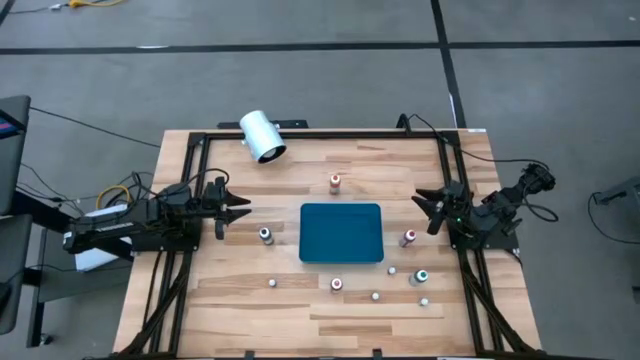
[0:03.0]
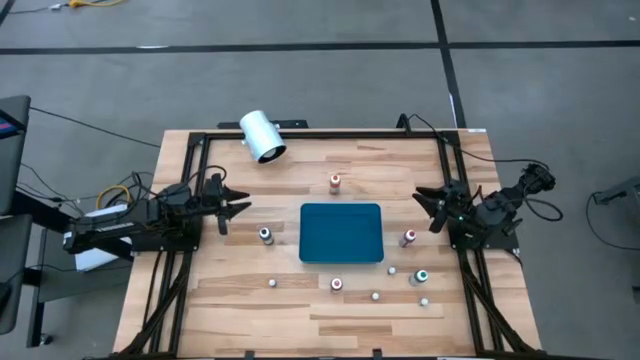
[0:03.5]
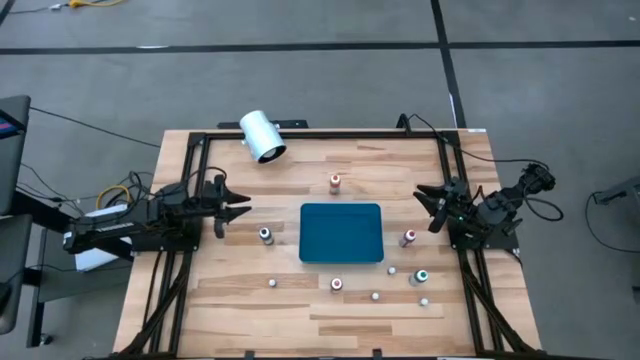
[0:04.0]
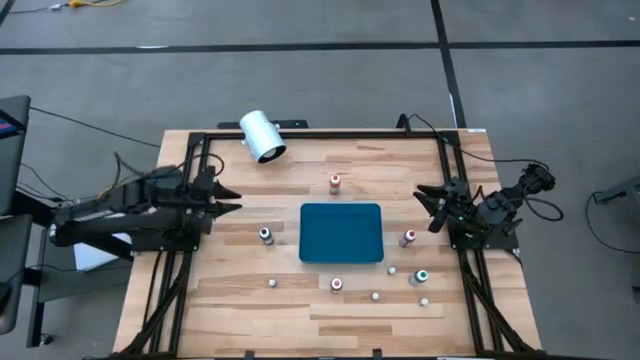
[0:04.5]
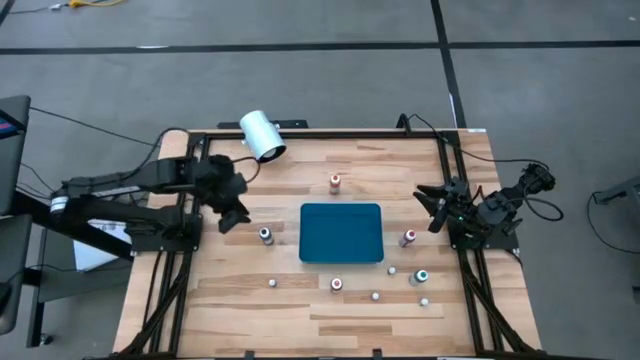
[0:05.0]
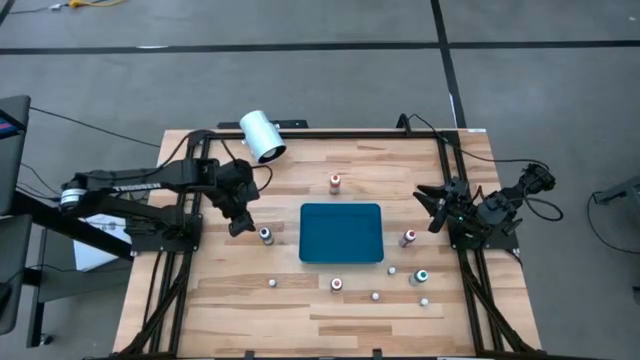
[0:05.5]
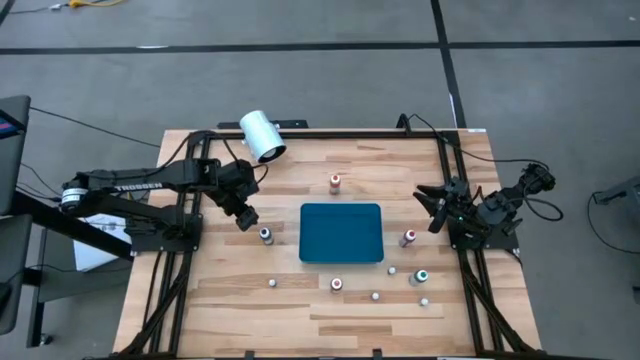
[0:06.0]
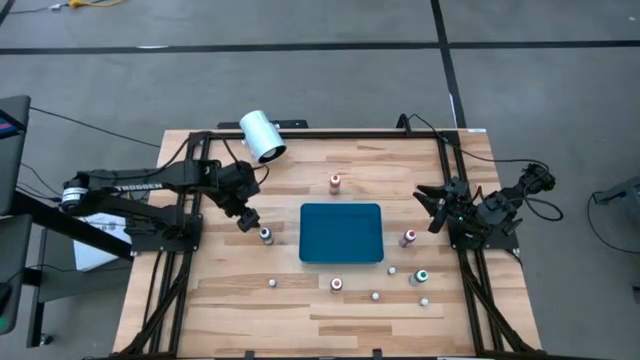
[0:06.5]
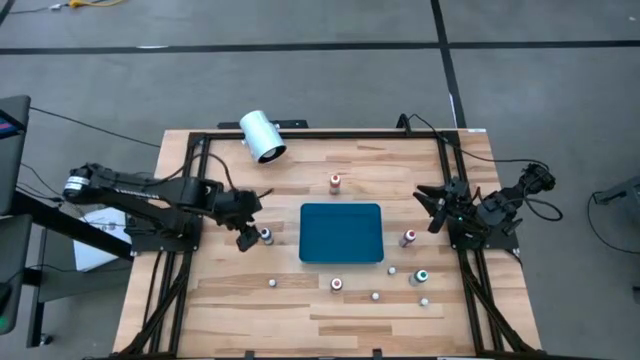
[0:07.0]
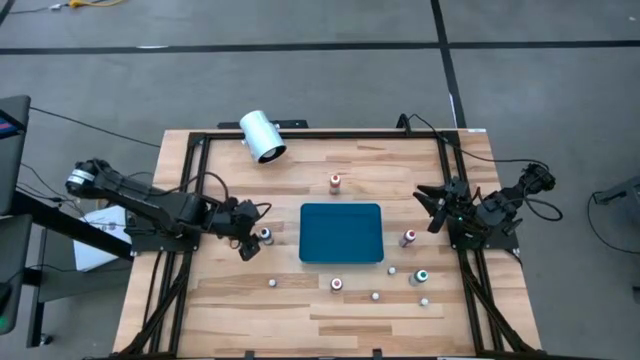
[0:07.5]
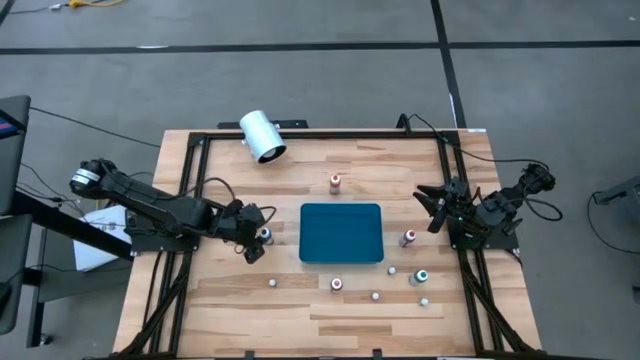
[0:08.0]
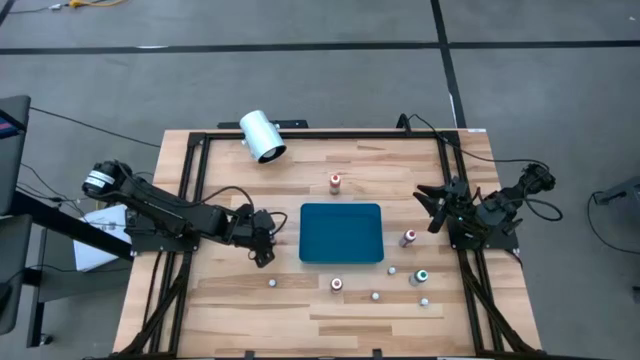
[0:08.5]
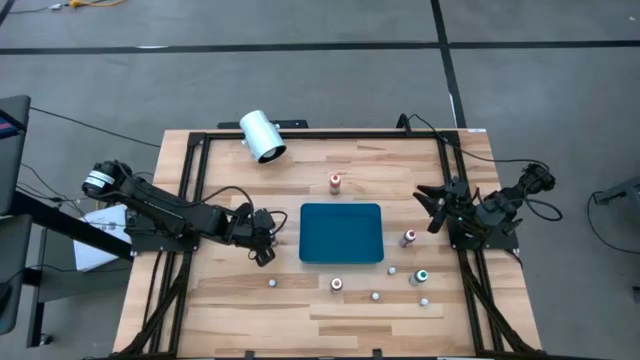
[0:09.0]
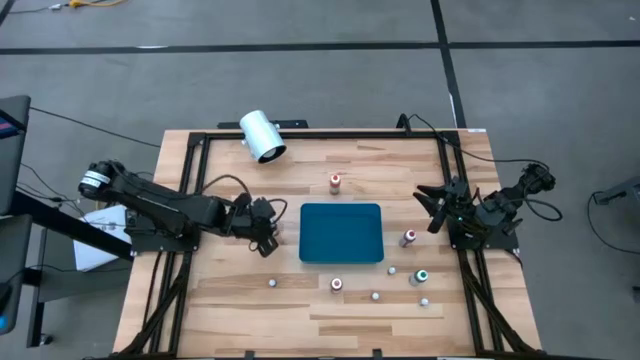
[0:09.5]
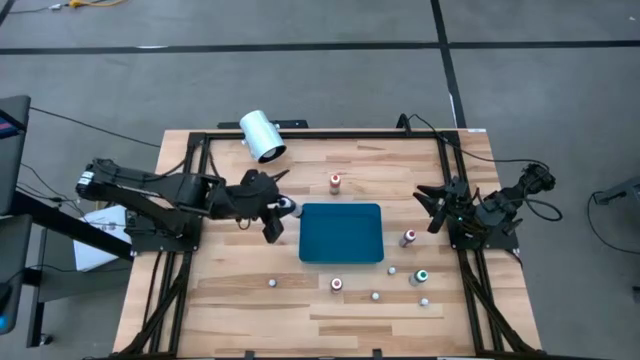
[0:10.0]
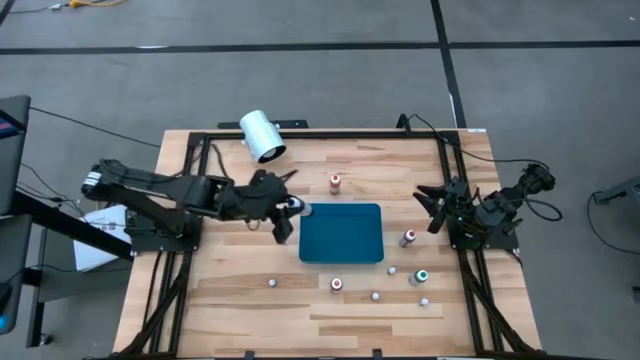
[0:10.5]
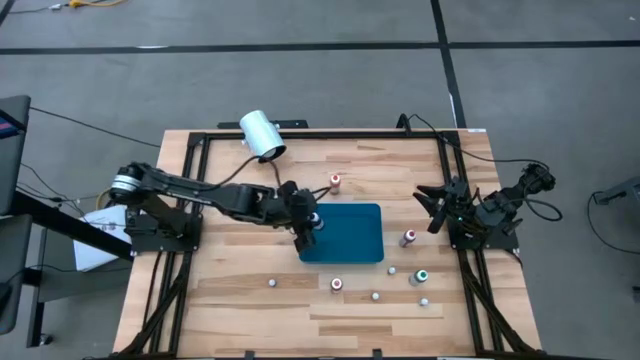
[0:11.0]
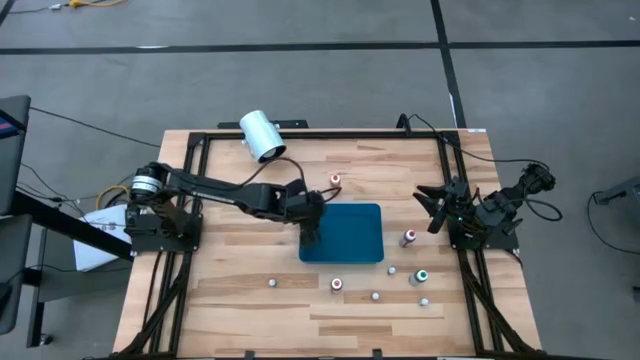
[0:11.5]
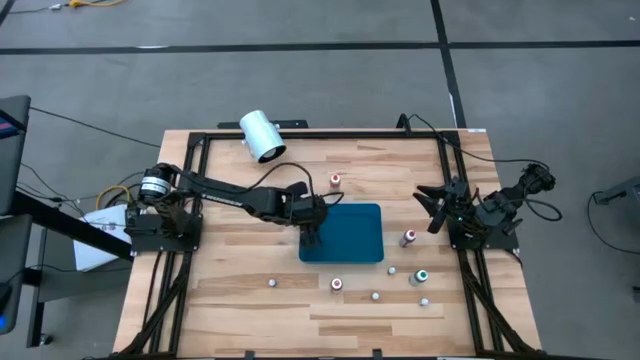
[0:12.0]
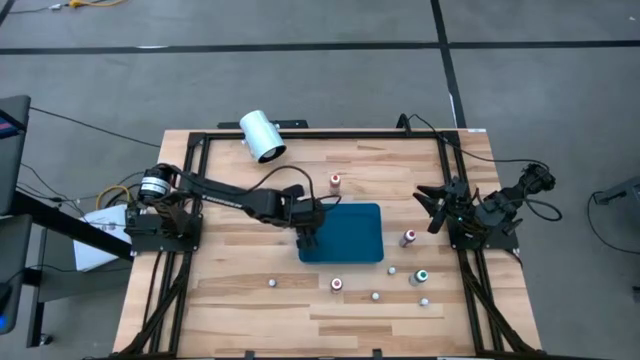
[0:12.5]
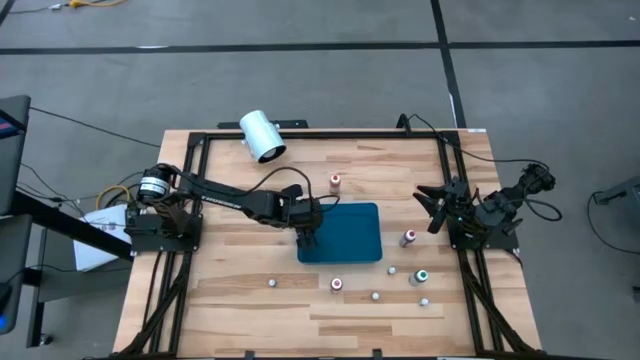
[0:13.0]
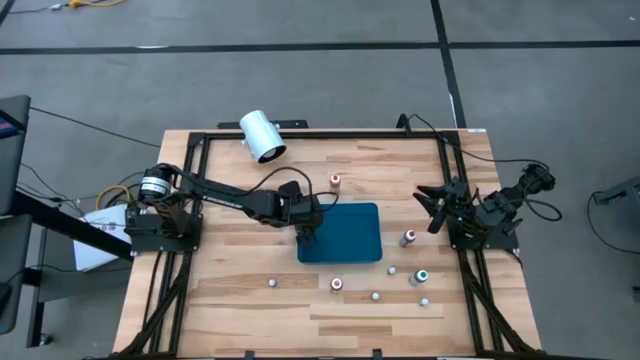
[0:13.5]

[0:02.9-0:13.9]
Task: Pick & Place food coloring
Put the large black food coloring bottle into the blue bin

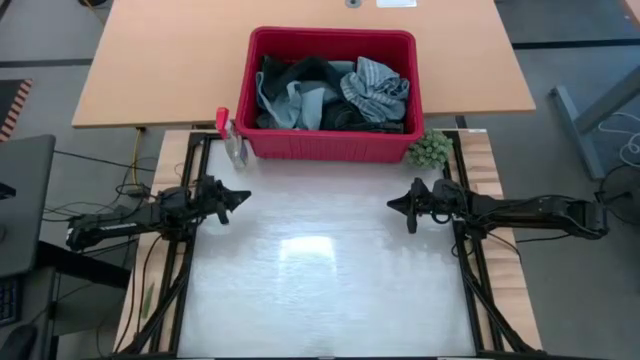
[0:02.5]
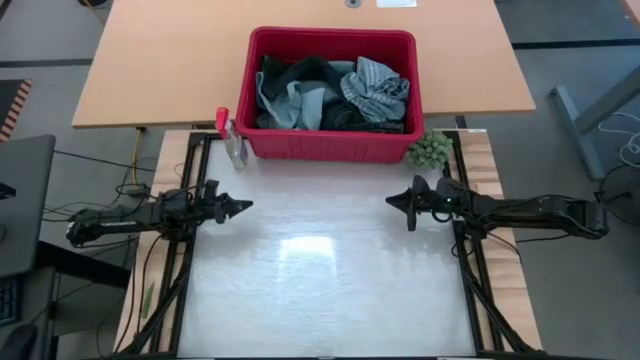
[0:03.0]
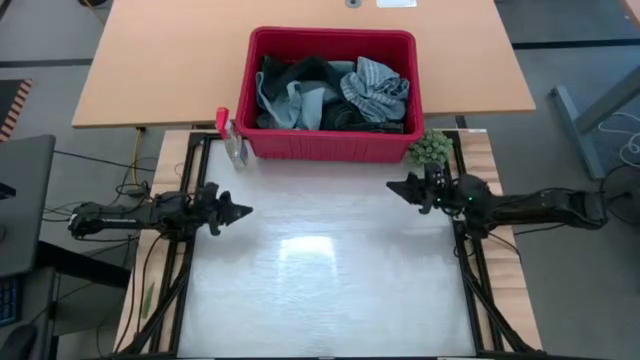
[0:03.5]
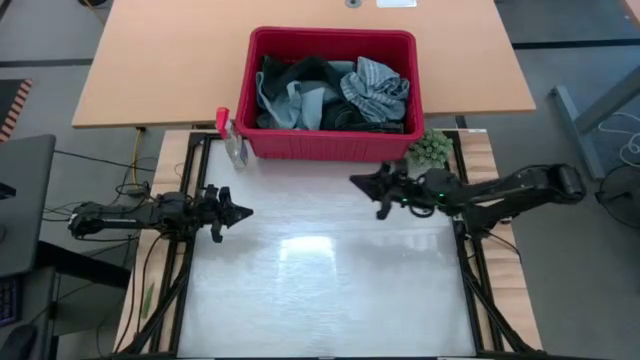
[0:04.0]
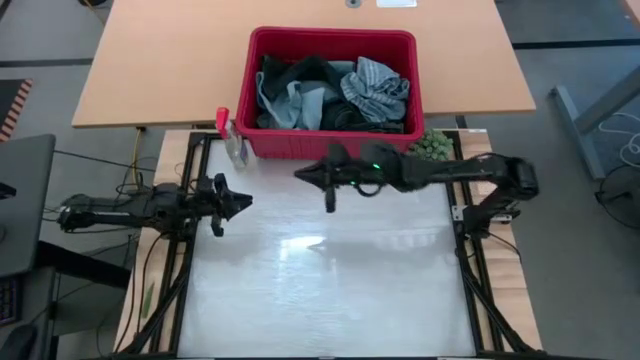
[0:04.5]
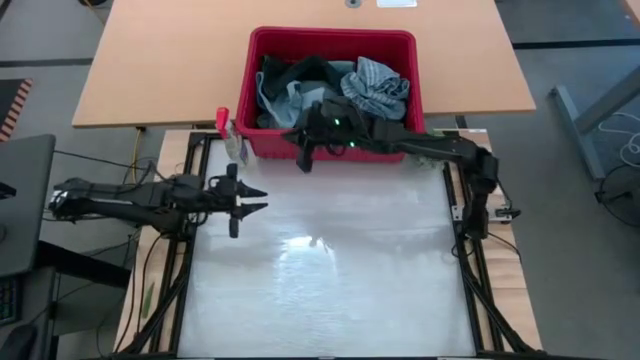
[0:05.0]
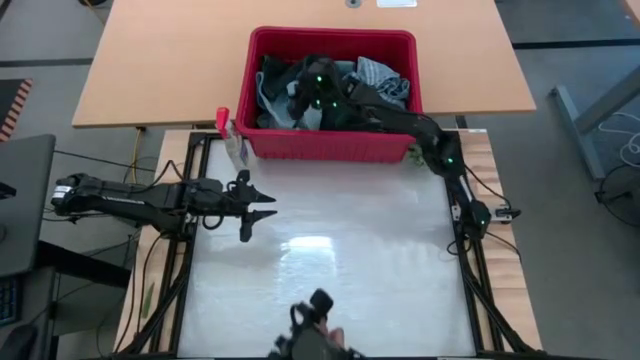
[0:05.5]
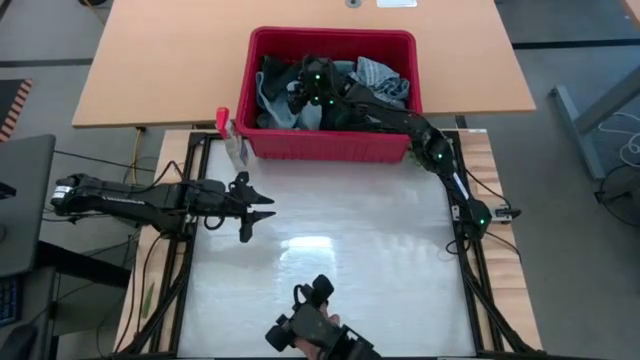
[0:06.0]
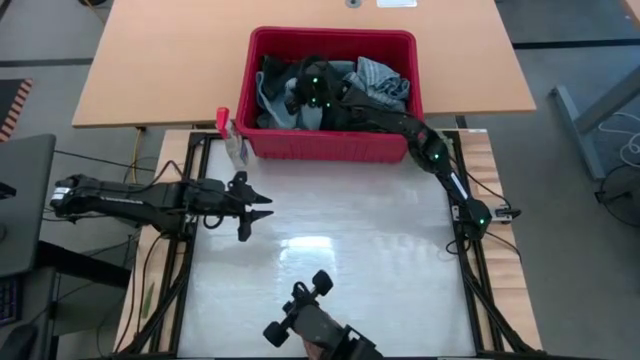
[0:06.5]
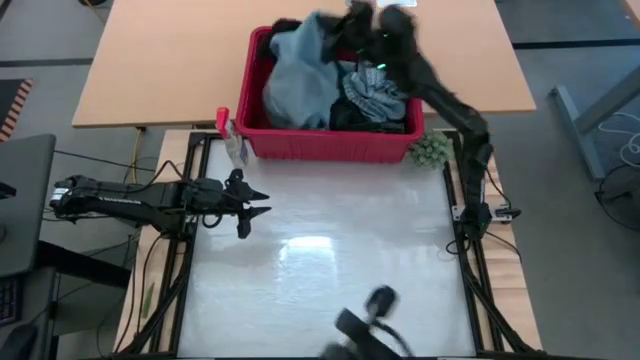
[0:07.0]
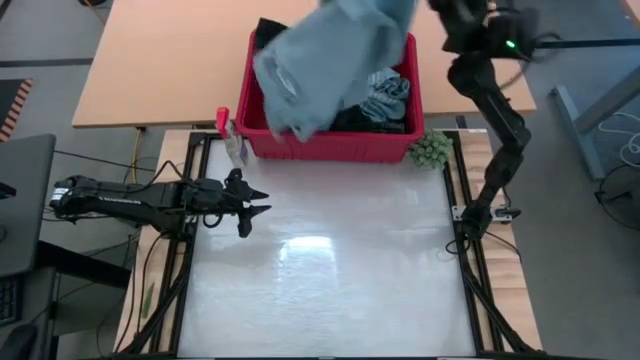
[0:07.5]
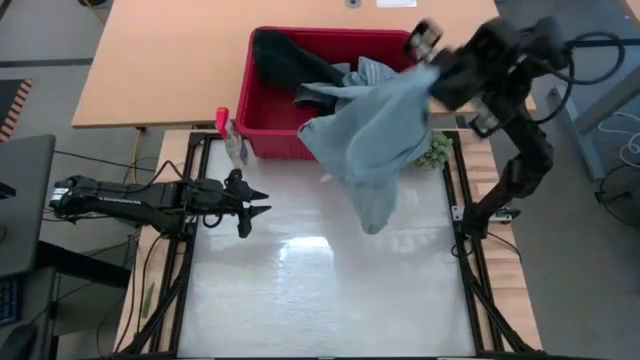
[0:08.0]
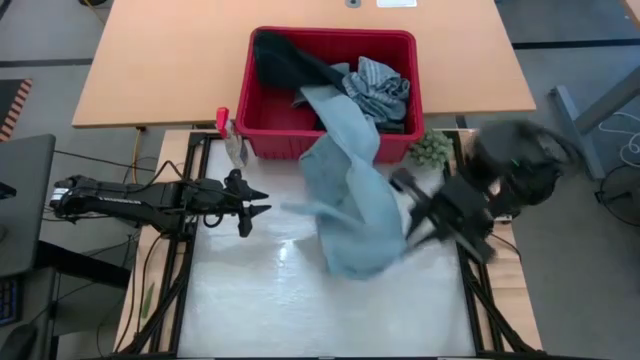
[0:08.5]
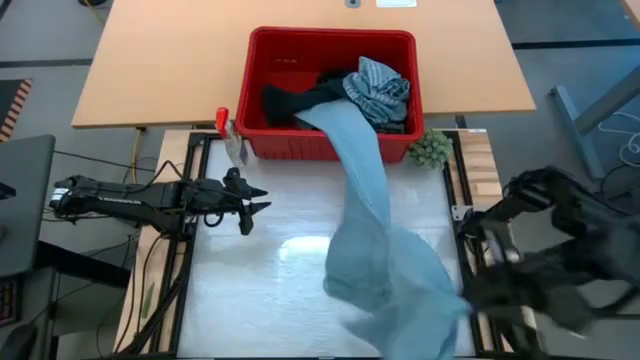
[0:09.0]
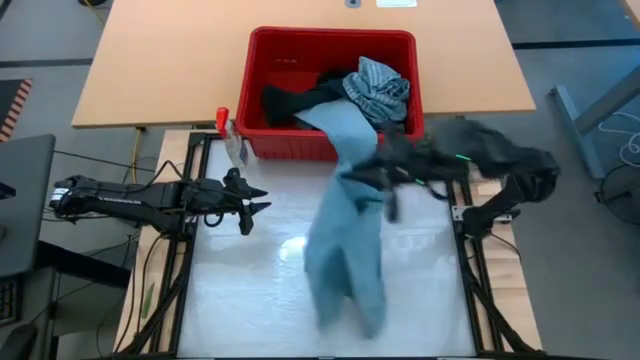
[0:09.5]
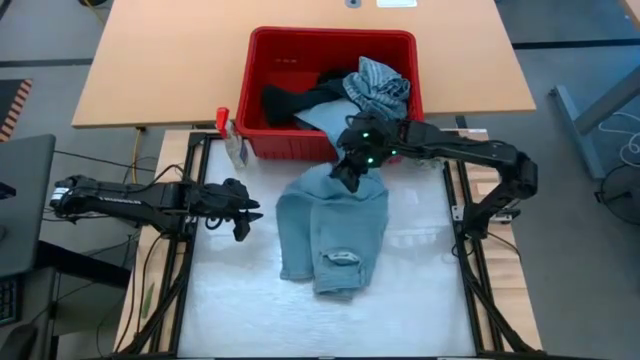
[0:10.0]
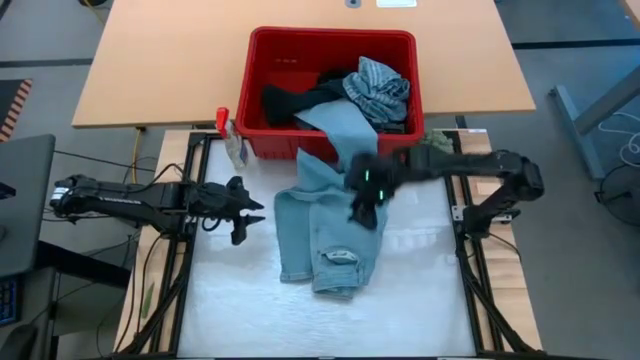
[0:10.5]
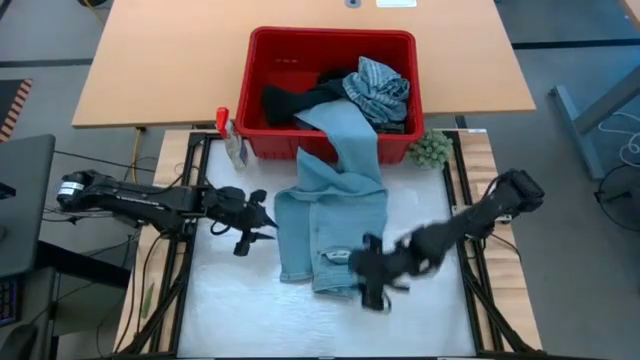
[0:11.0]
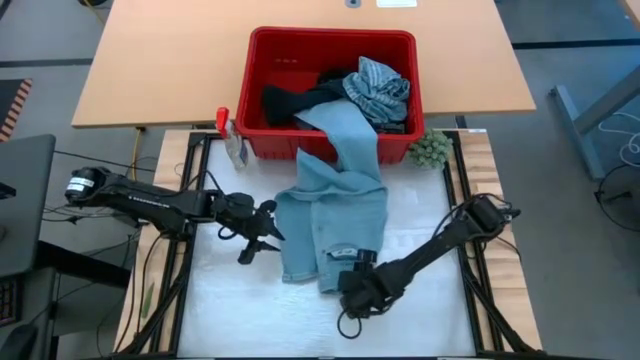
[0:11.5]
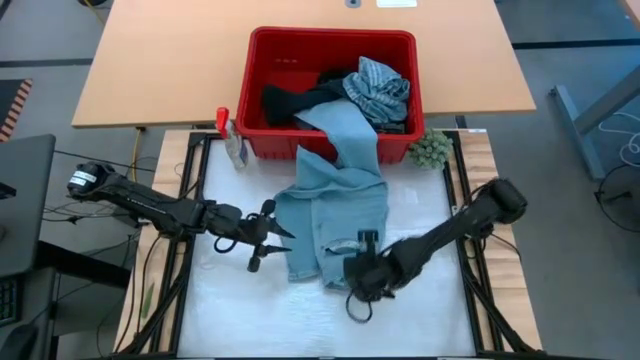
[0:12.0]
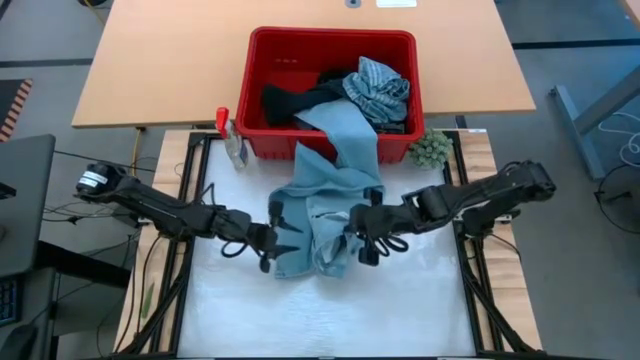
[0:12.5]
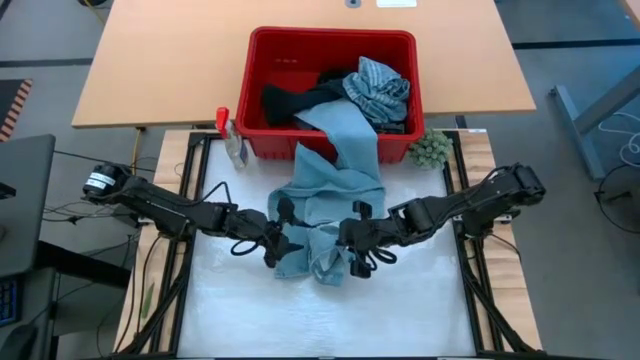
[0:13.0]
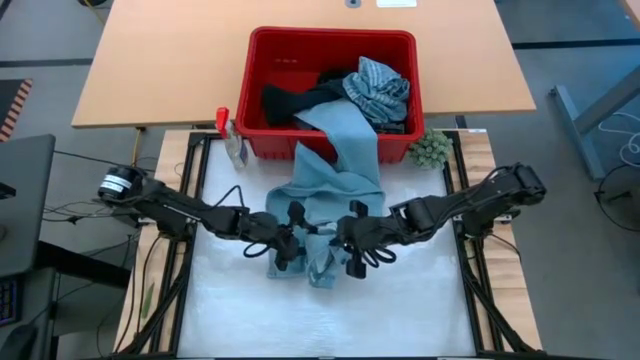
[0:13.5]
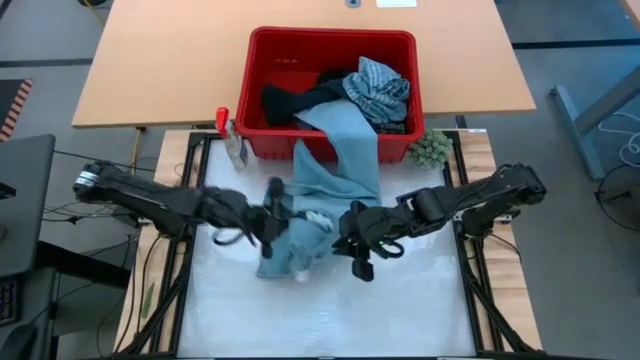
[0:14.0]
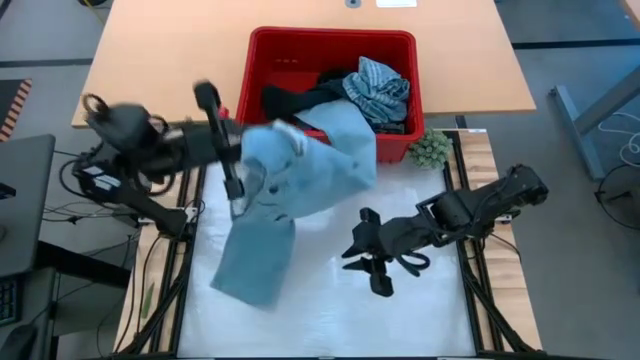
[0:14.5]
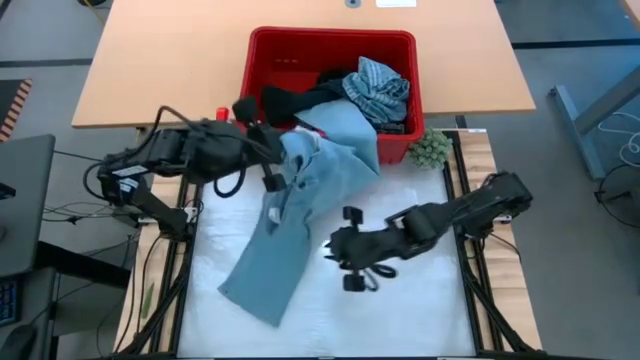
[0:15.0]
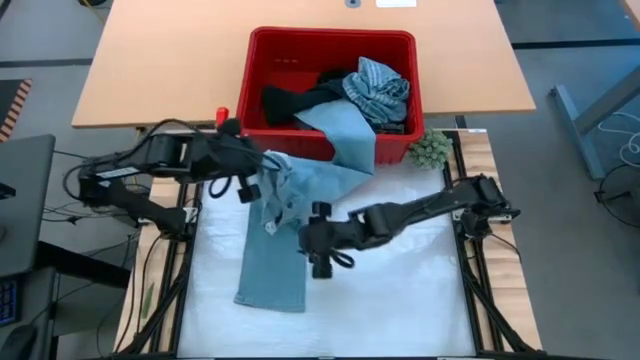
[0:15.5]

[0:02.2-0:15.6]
Task: Fold laundry
Fold the blue pants from the red laundry bin
